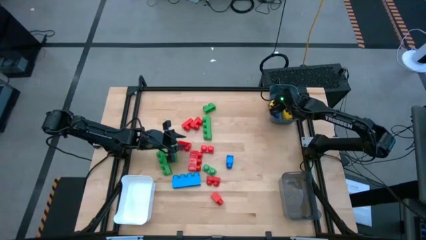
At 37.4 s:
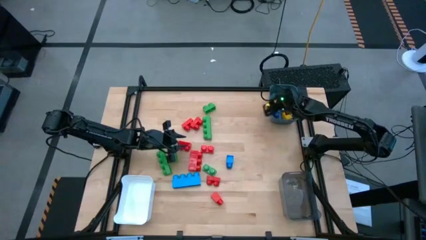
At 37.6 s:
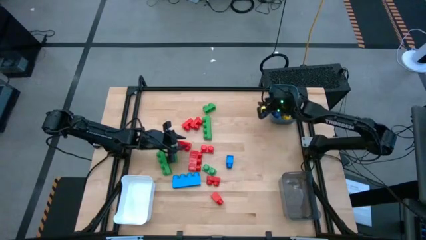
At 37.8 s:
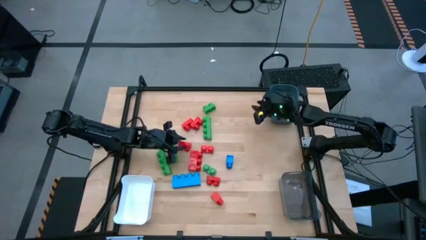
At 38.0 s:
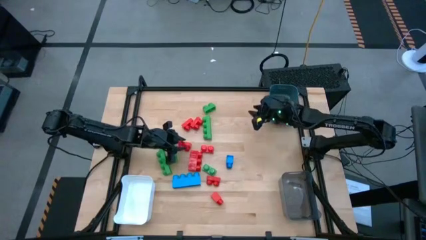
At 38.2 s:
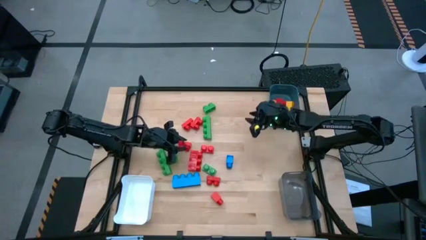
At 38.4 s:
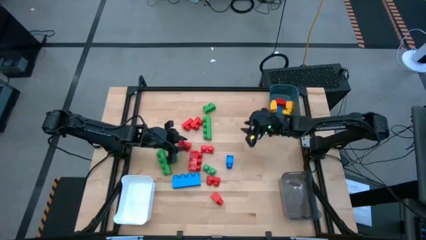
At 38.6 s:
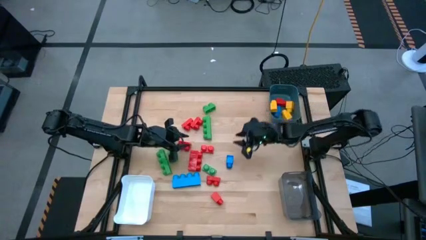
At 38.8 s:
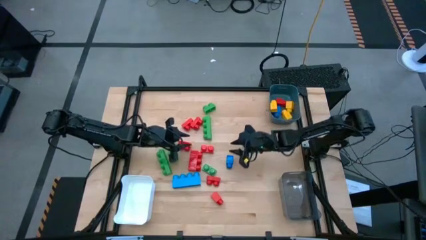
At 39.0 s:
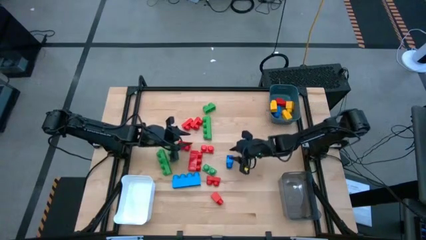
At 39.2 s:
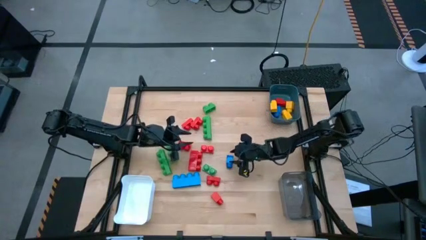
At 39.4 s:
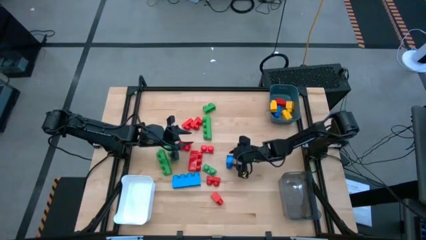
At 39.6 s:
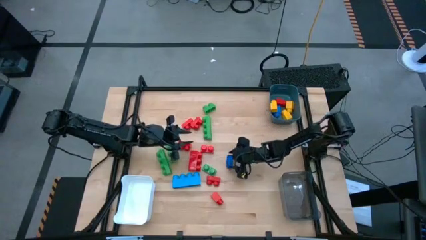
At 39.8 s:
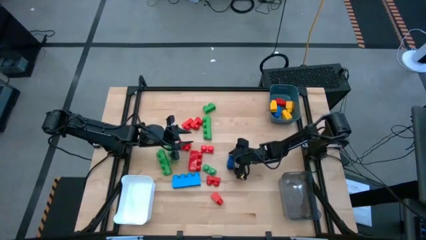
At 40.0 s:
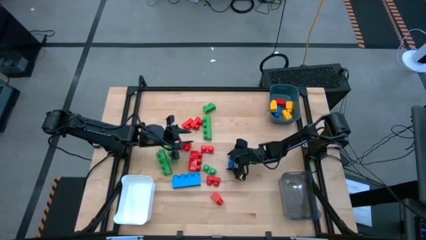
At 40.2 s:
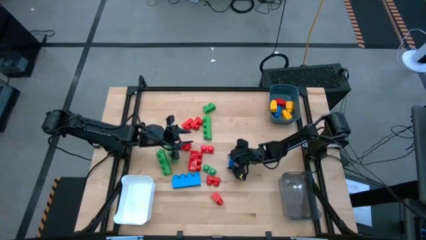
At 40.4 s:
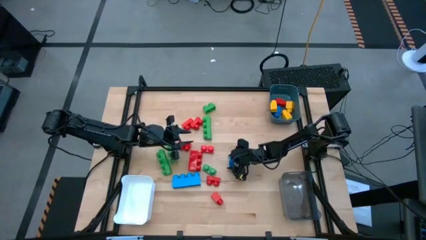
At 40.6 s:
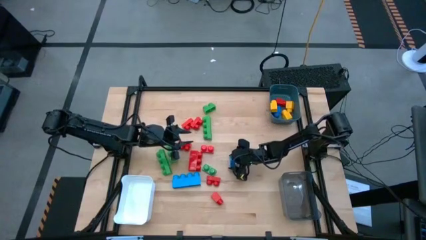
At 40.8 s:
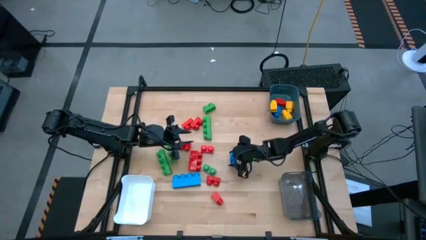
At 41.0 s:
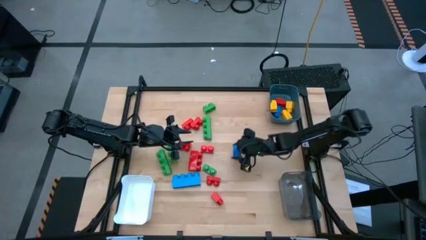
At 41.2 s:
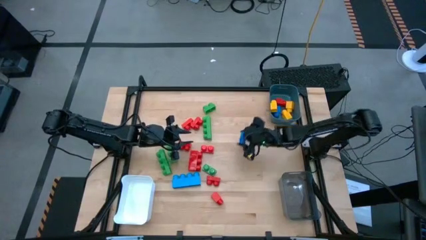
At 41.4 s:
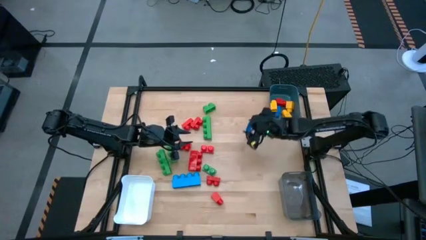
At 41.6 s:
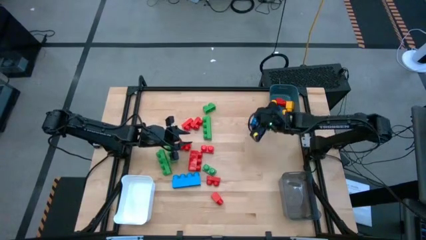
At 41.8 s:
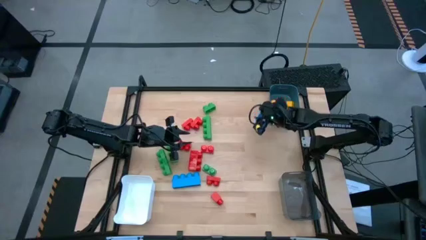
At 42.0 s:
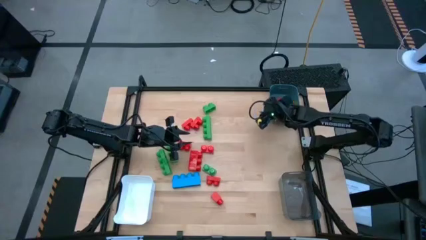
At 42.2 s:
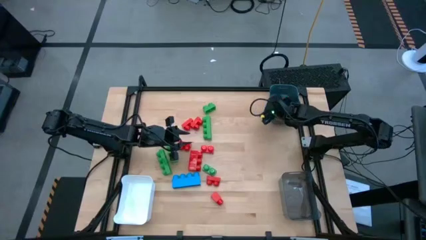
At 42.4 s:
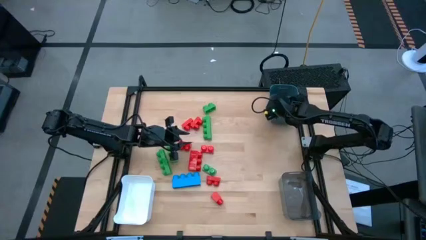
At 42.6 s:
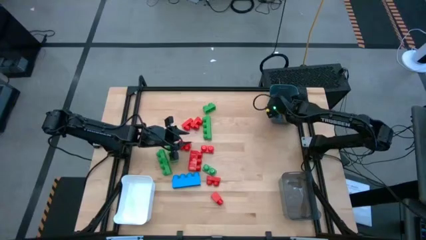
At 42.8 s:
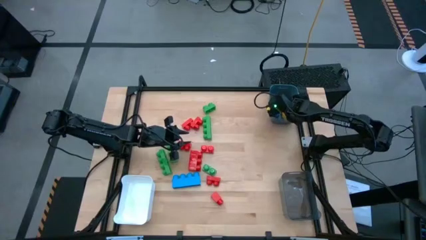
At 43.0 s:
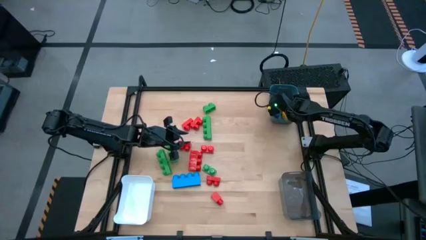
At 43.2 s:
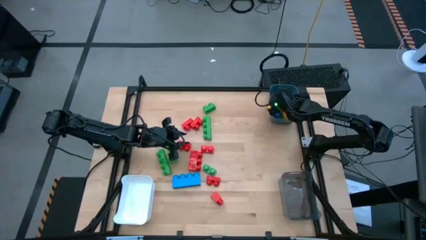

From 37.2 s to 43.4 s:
Task: Sort blocks by size
Put the one stud blue game piece into the blue bin

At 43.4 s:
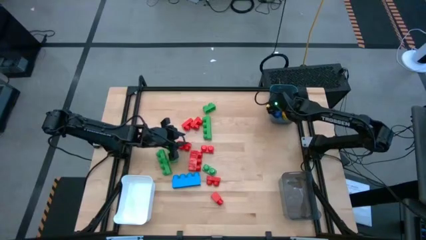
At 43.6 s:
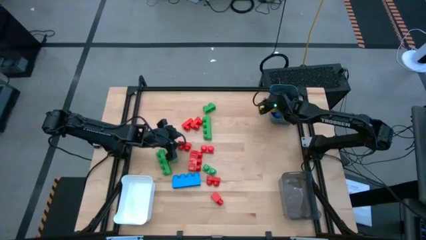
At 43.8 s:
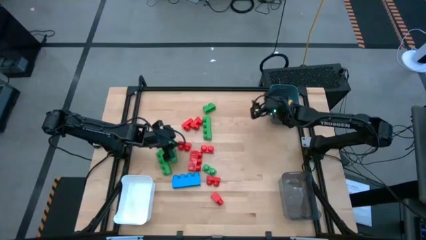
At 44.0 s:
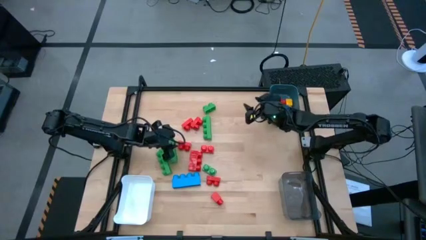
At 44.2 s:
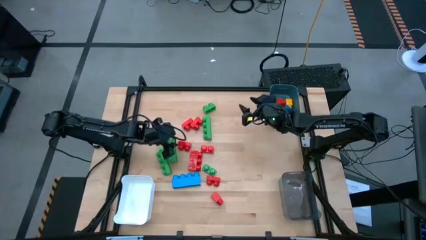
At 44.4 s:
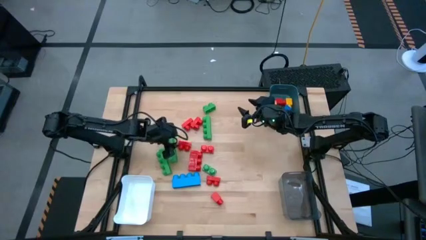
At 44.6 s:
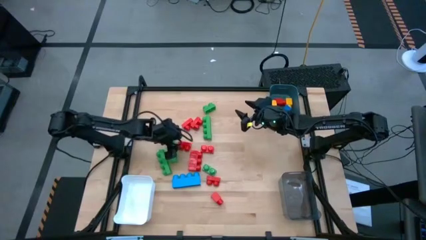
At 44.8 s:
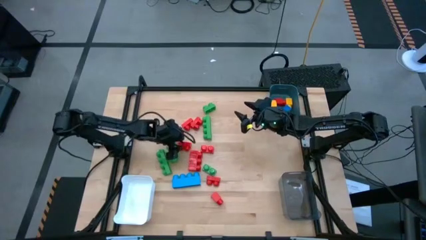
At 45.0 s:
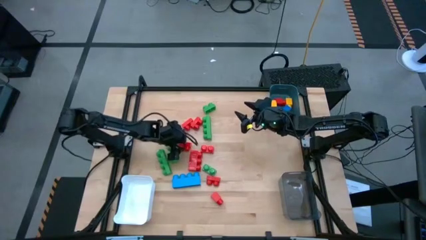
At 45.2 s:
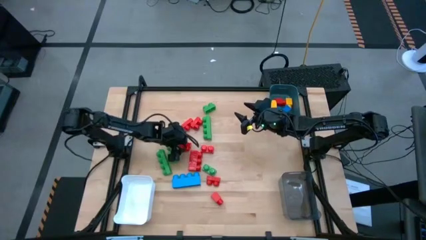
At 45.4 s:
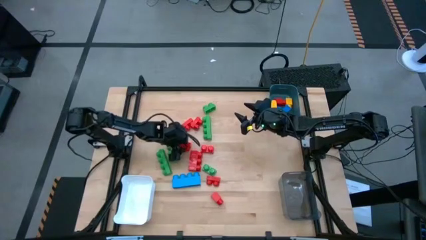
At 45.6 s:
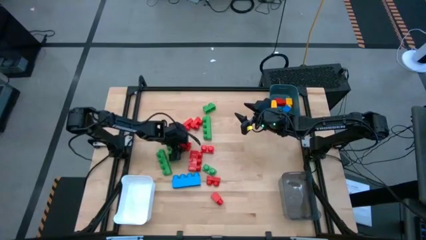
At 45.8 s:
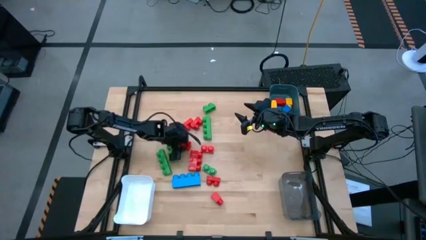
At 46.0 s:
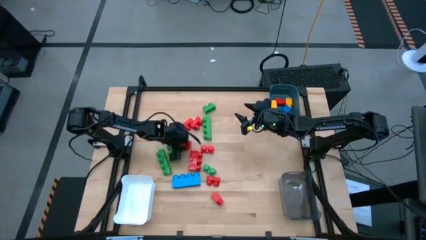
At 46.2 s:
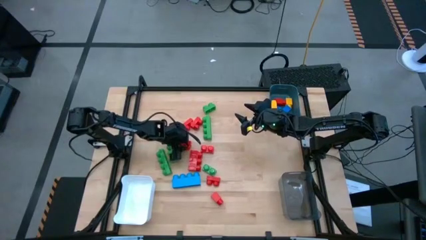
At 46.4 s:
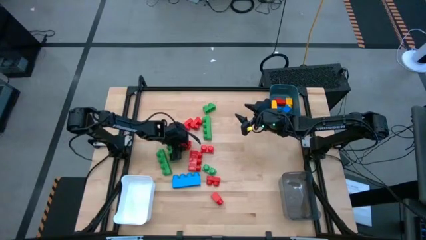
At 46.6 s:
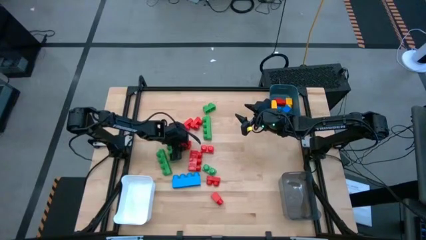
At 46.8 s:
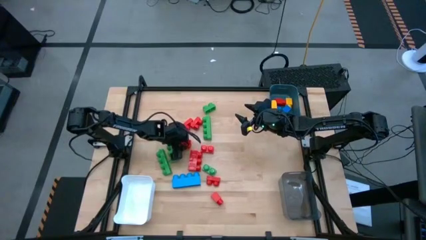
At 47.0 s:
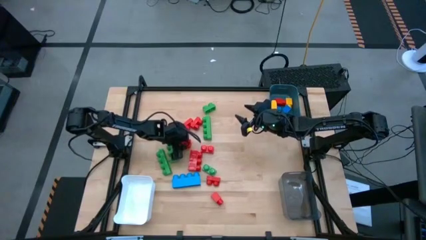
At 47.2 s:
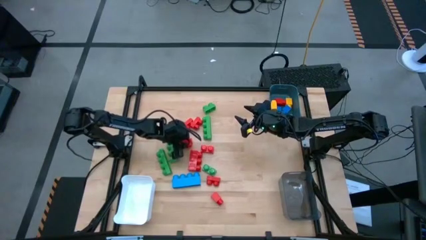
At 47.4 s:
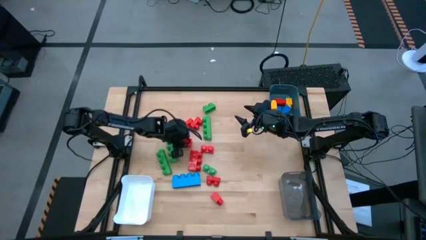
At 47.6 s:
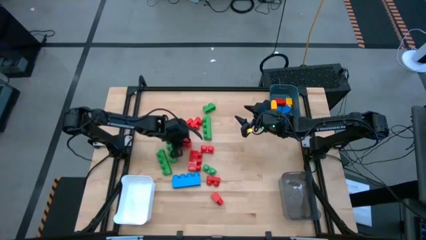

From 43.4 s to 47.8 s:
Put the two stud red game piece into the white bin

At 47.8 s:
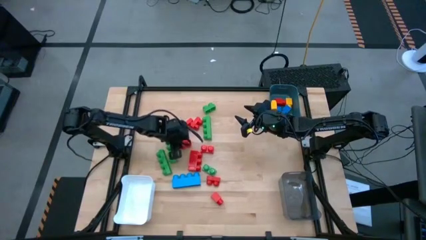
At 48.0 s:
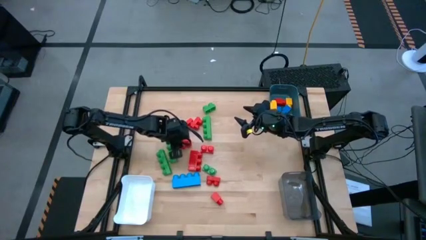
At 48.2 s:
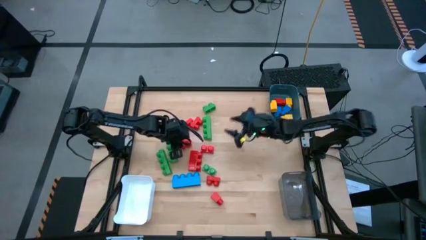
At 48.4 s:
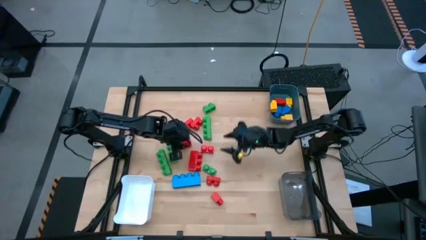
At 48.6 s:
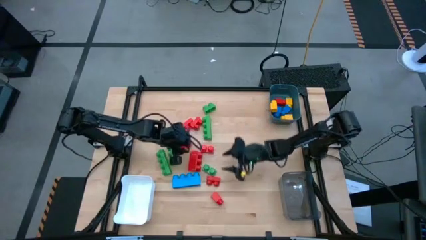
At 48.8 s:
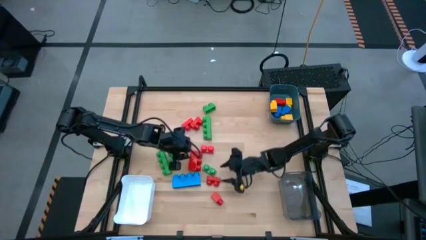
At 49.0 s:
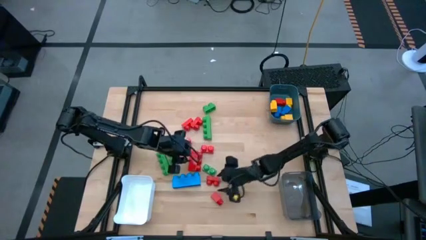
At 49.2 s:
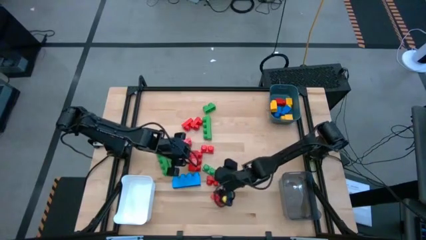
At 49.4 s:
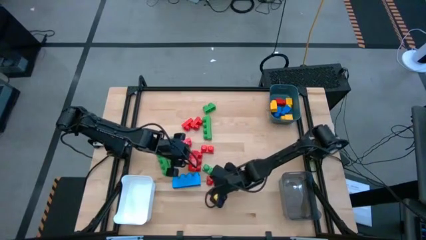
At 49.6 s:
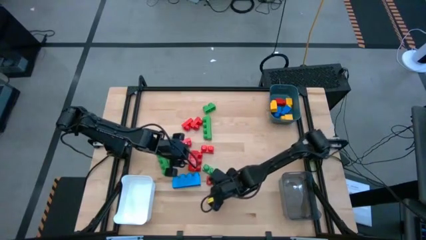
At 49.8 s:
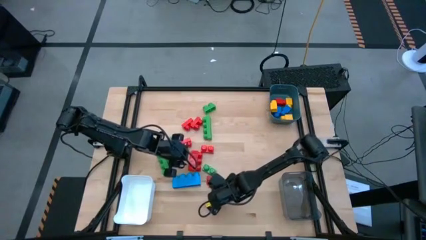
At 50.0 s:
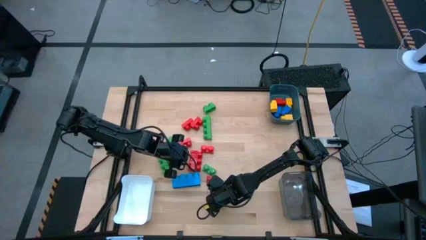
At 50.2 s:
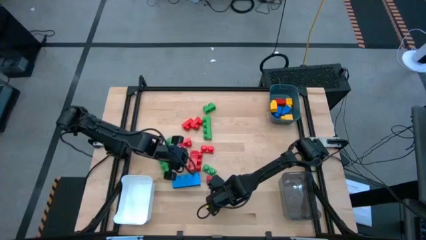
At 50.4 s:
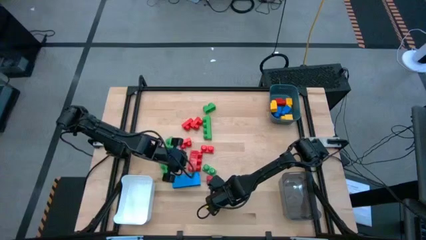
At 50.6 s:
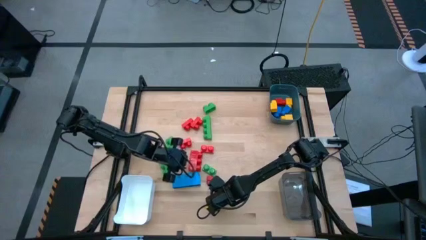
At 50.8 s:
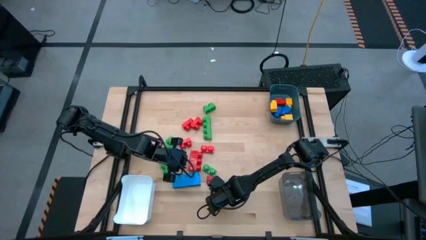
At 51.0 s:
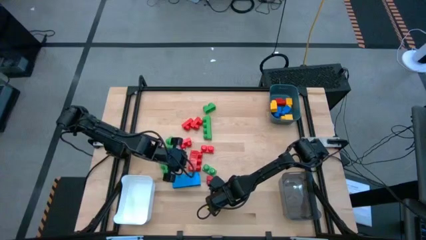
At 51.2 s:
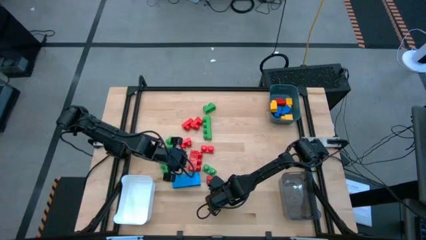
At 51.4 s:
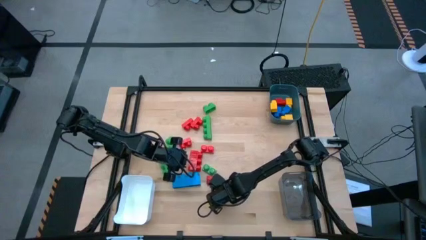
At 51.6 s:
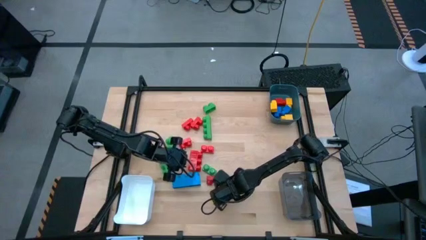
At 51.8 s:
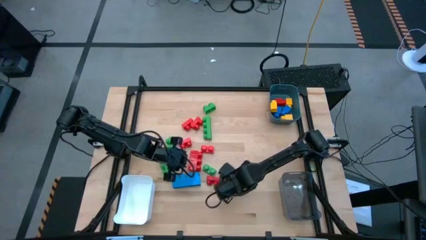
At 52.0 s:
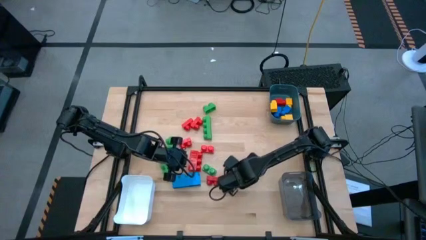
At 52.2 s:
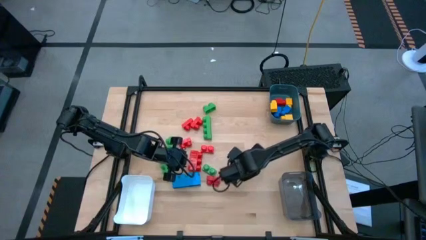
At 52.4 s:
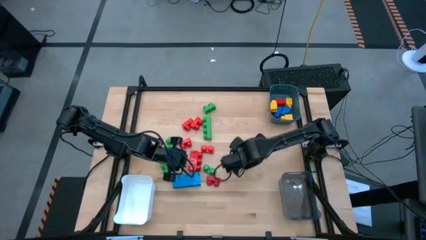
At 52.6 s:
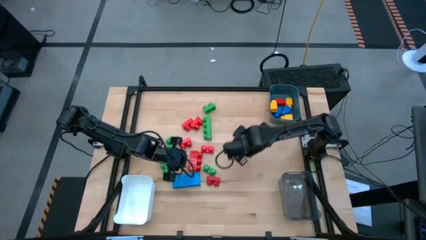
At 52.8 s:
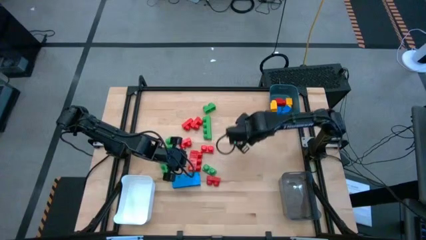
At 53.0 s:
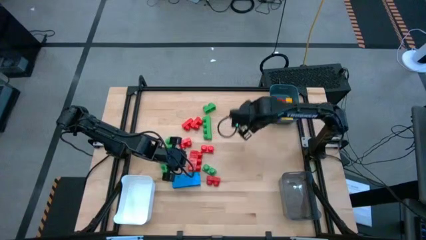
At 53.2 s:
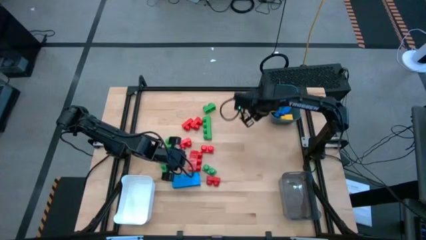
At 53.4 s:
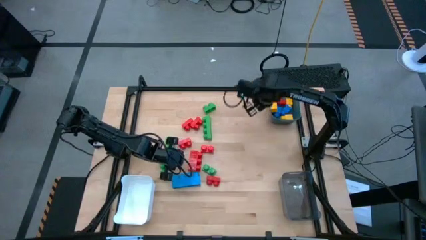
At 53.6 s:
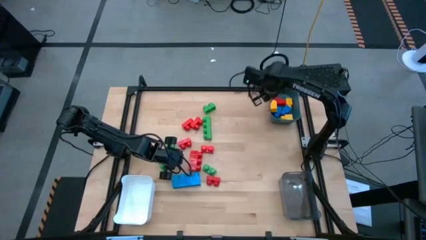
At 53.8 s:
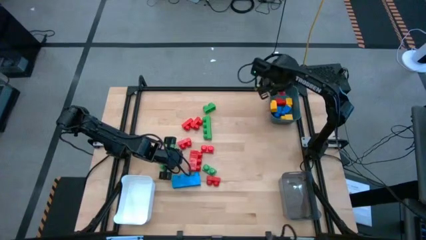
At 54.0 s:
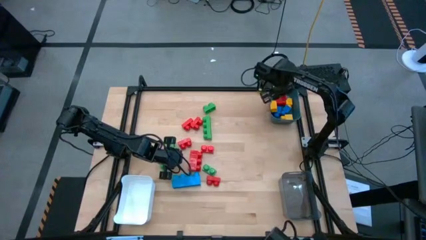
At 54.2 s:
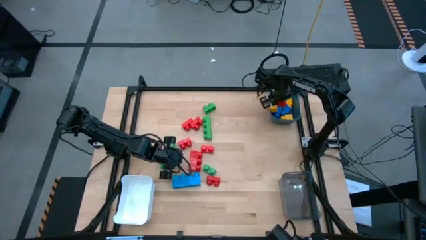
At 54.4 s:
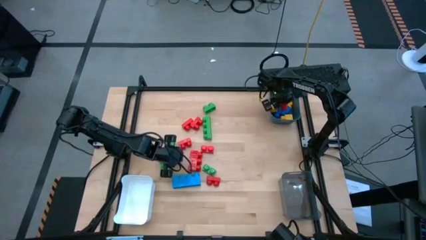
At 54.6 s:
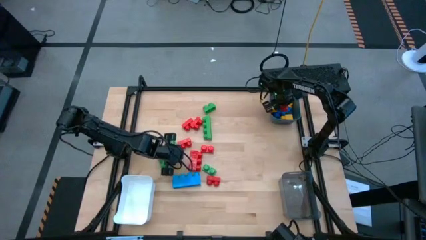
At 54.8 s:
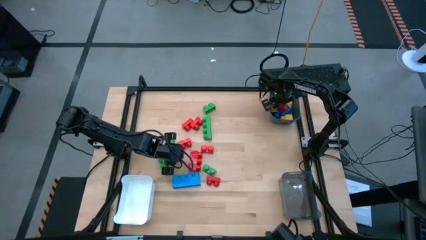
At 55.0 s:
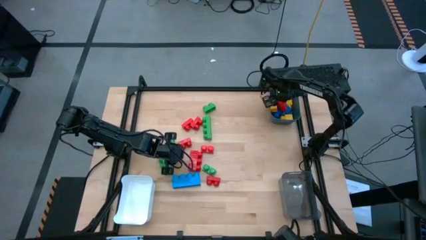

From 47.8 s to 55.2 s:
Put the one stud red game piece into the blue bin
